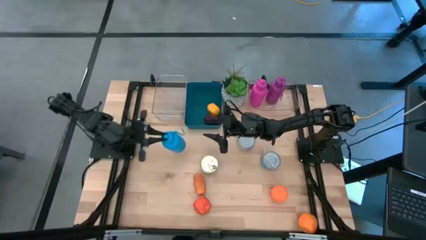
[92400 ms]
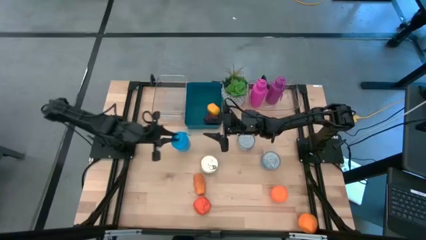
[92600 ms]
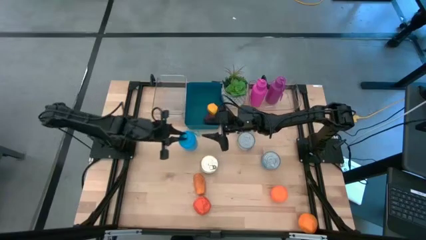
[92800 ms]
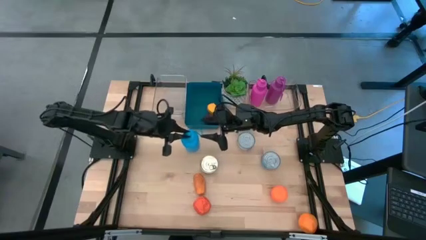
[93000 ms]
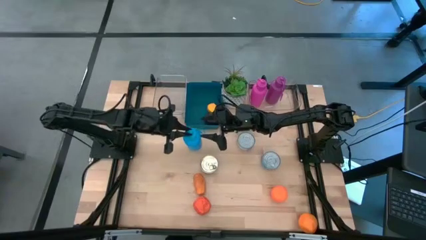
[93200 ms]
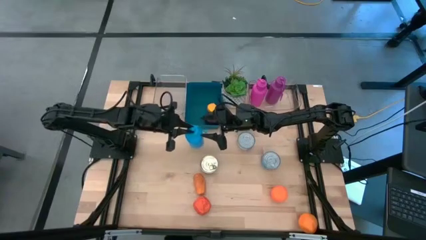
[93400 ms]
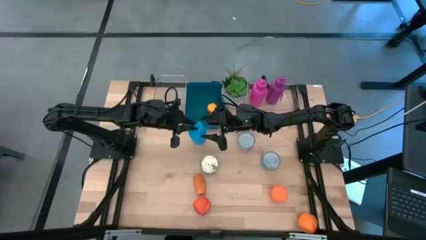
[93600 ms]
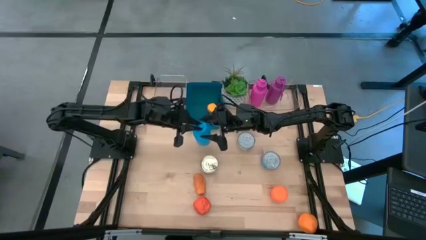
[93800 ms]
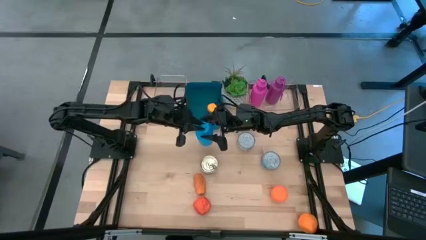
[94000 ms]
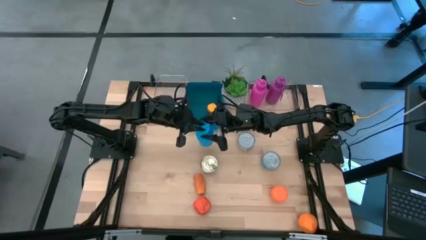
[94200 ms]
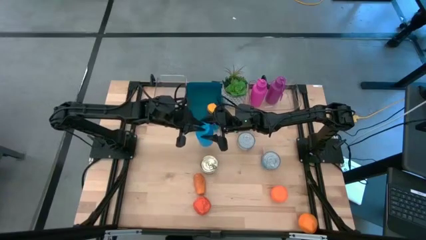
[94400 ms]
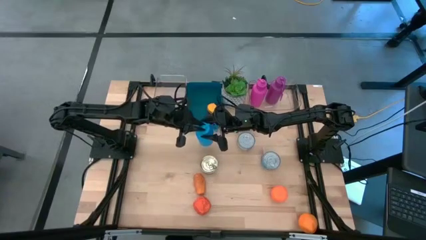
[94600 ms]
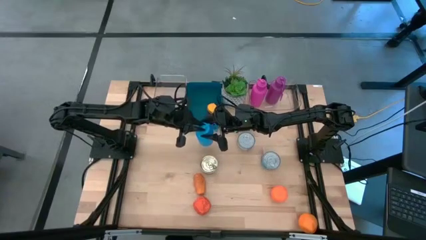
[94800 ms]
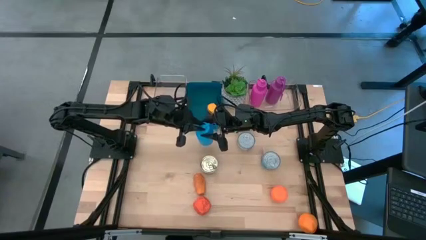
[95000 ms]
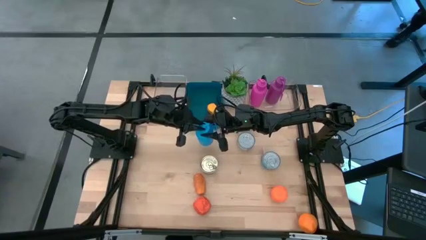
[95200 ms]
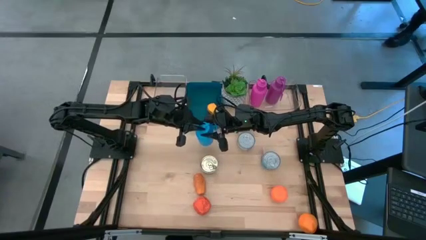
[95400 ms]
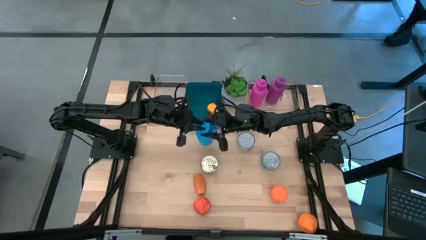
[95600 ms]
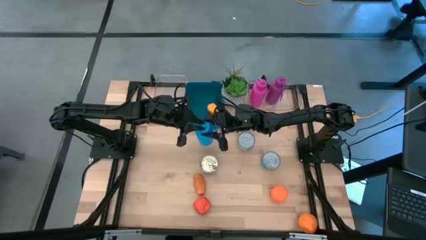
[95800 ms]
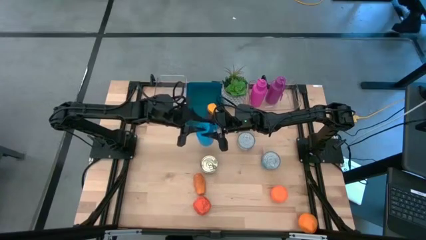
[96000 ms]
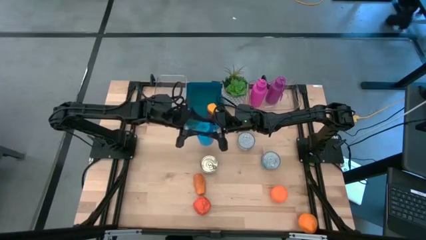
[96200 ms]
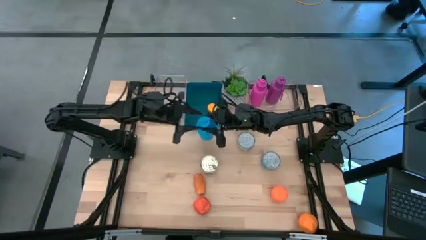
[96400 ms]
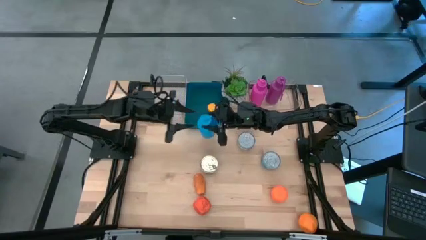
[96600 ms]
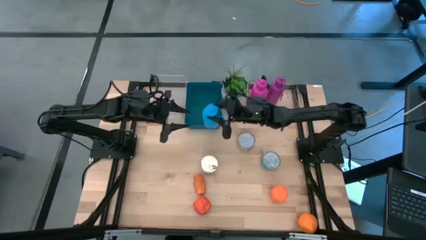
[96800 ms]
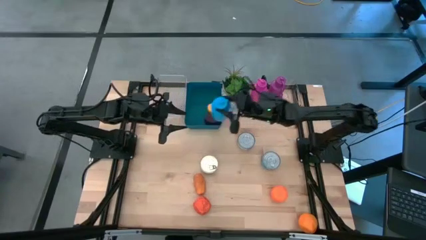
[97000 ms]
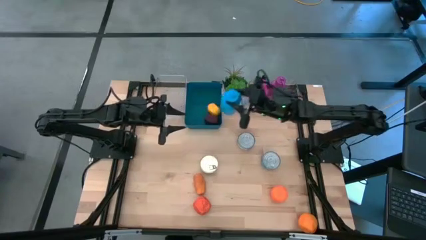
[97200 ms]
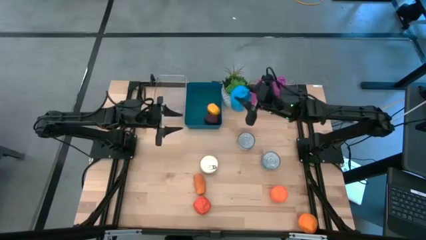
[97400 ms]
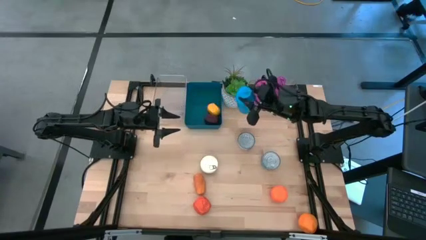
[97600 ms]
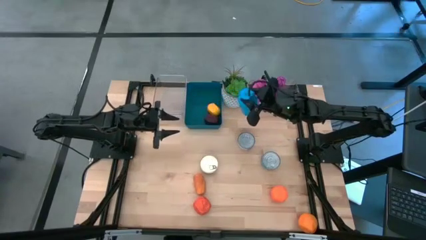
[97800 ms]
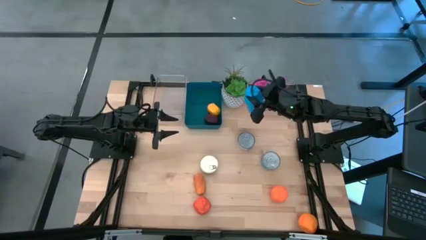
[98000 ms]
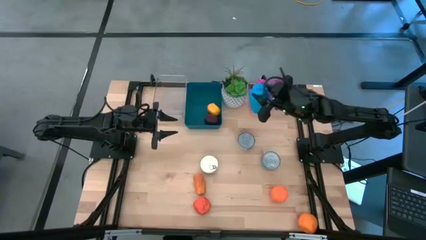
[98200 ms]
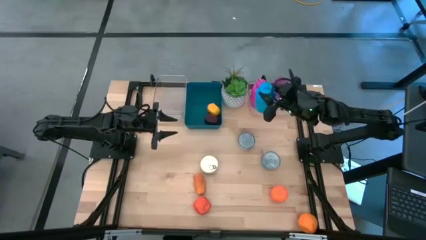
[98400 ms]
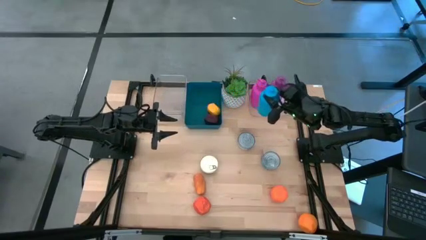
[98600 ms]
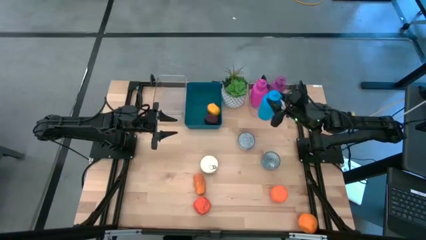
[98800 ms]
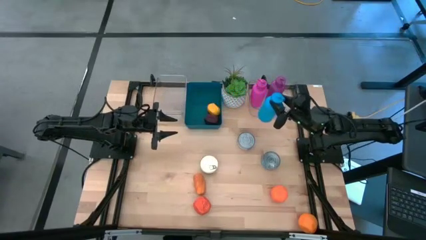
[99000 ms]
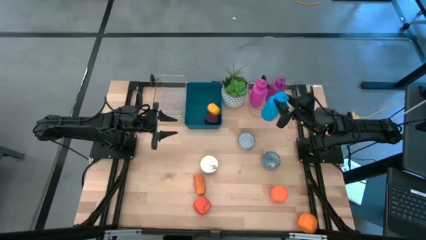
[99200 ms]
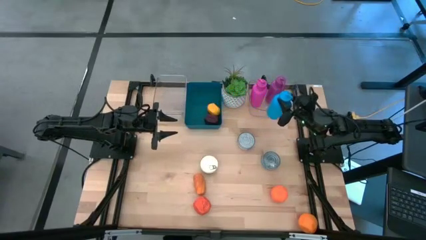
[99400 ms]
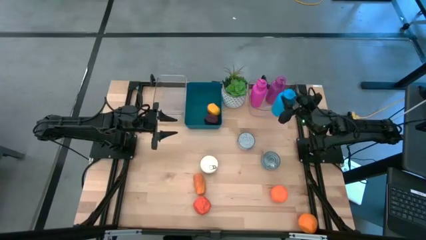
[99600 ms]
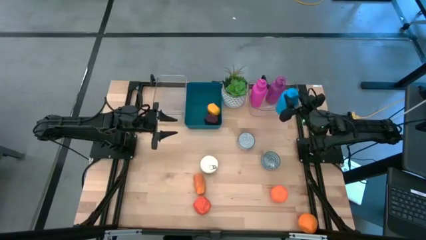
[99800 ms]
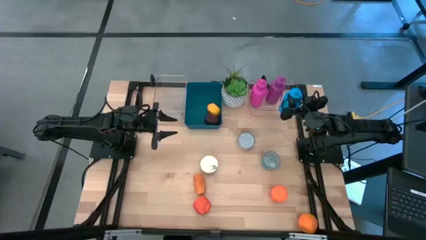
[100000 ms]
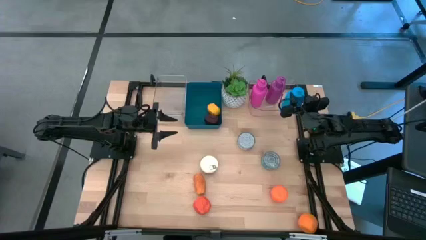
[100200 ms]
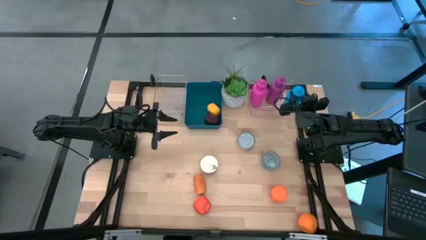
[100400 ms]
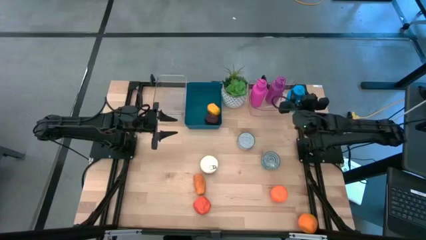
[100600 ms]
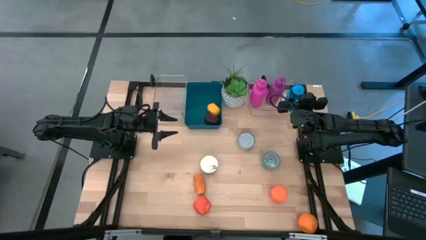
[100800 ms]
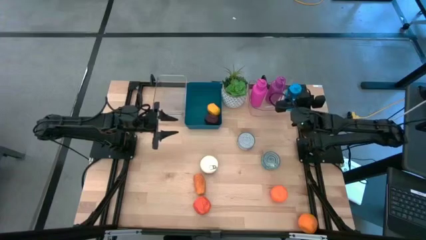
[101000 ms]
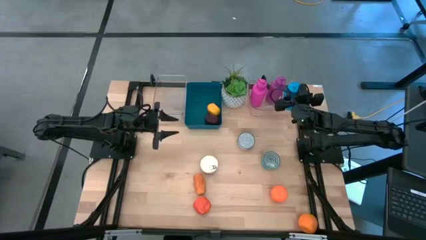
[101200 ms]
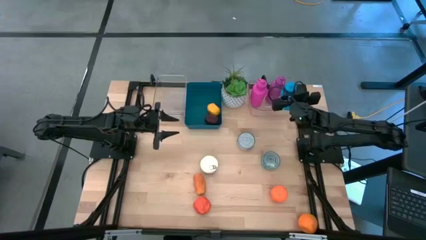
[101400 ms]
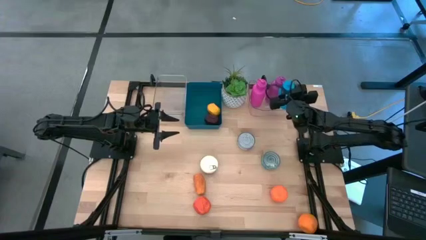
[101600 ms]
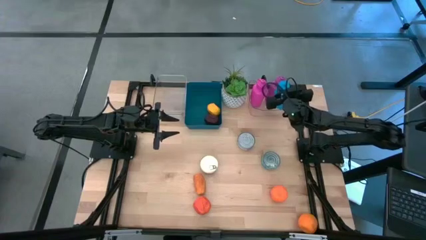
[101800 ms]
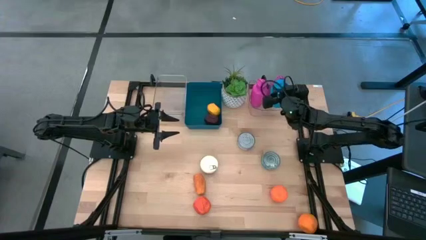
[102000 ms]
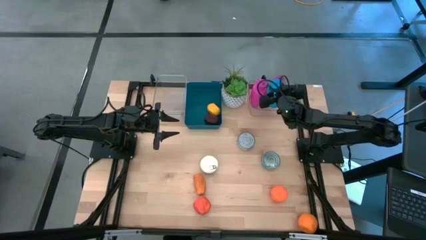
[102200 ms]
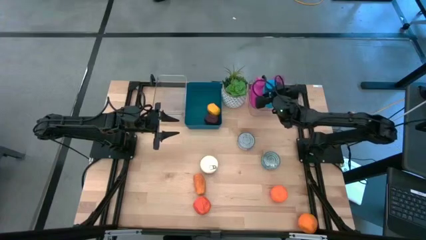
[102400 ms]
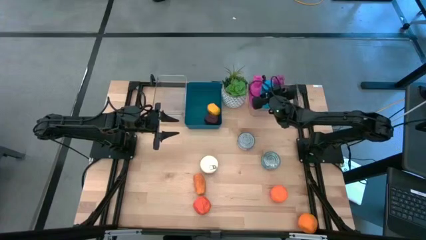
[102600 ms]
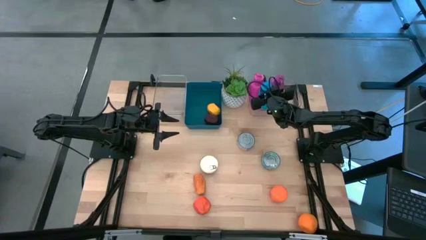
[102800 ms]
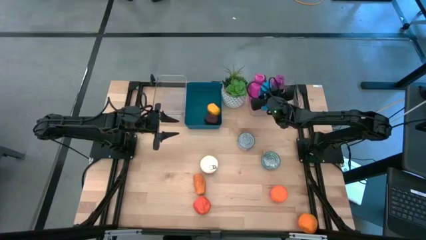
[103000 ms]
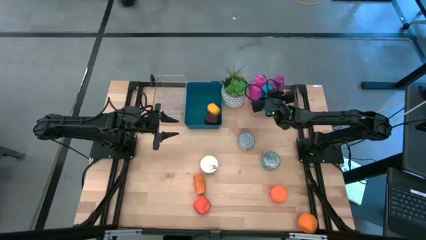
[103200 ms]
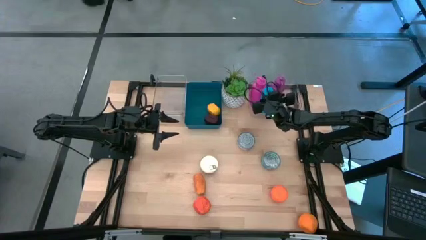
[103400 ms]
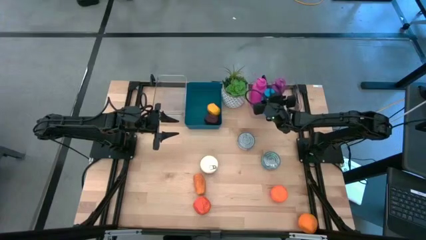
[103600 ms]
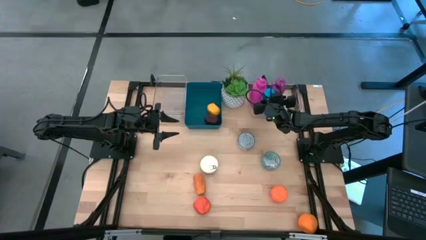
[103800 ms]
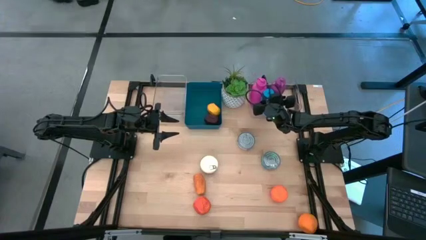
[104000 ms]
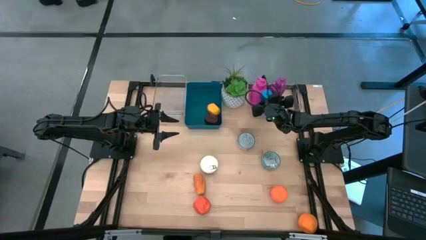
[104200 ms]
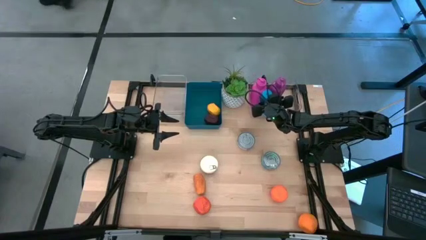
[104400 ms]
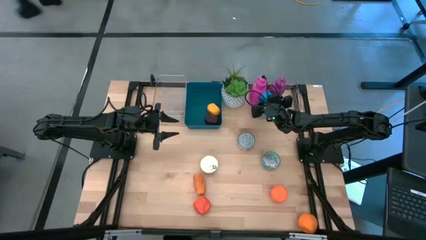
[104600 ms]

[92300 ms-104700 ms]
Task: Pick & Place Food Item
Put the blue bottle into the right transparent bin

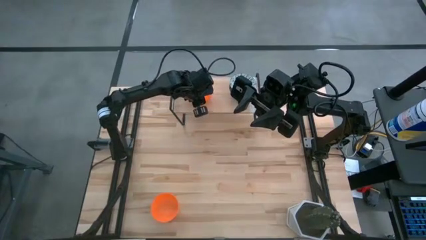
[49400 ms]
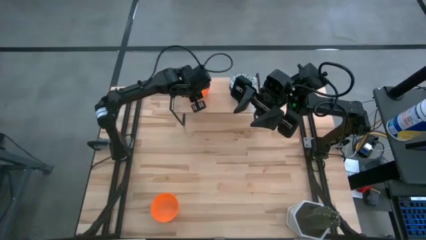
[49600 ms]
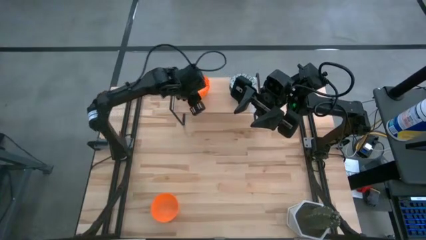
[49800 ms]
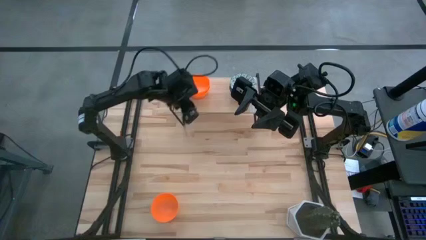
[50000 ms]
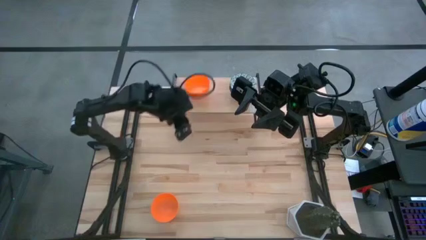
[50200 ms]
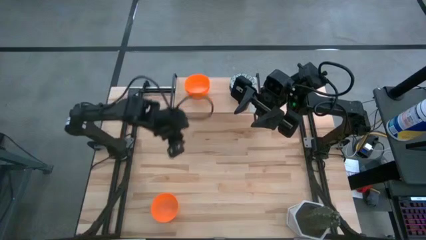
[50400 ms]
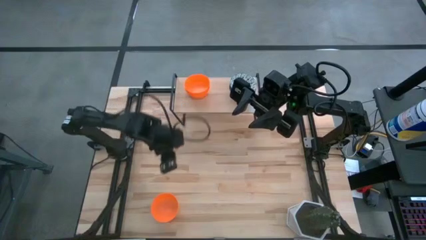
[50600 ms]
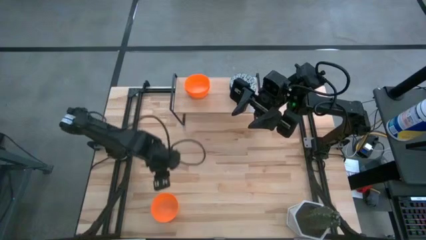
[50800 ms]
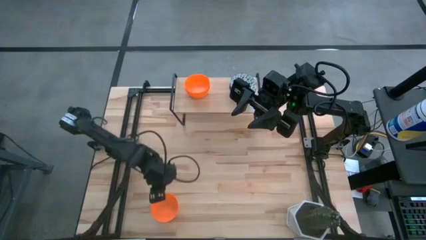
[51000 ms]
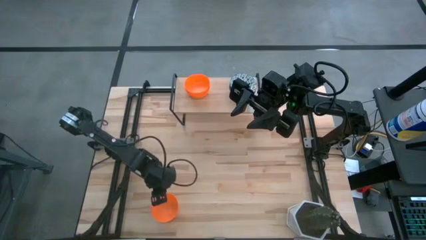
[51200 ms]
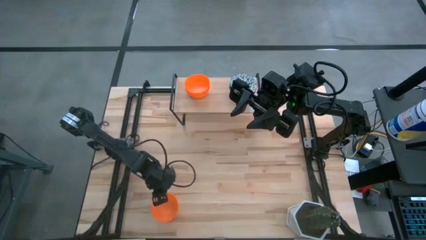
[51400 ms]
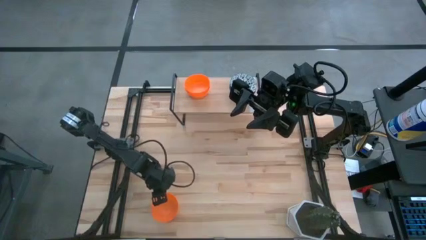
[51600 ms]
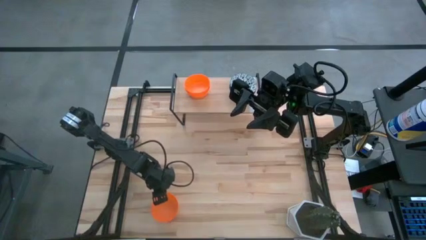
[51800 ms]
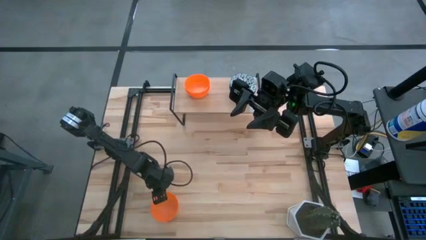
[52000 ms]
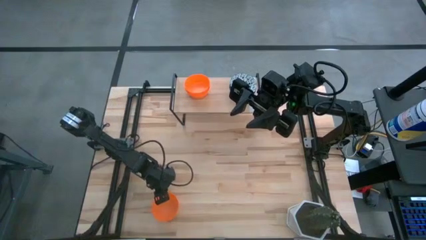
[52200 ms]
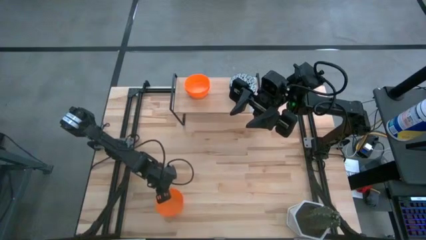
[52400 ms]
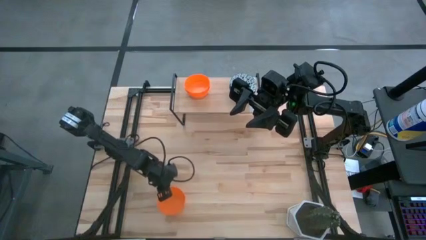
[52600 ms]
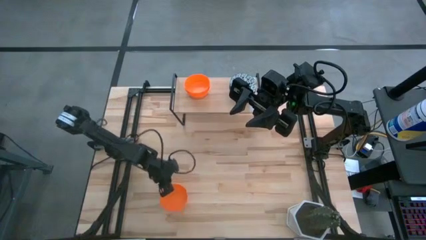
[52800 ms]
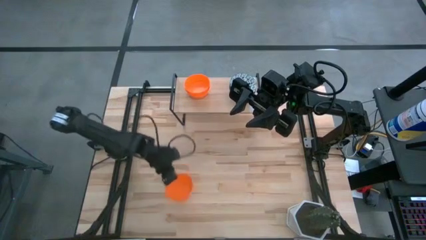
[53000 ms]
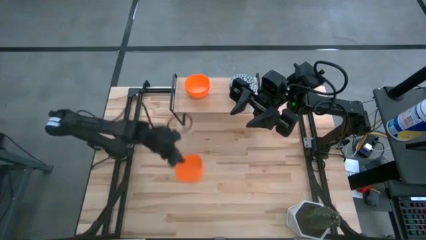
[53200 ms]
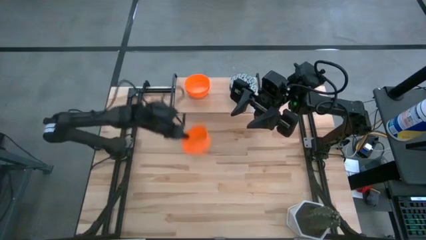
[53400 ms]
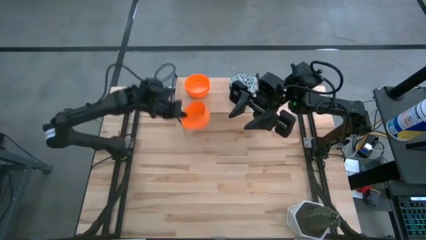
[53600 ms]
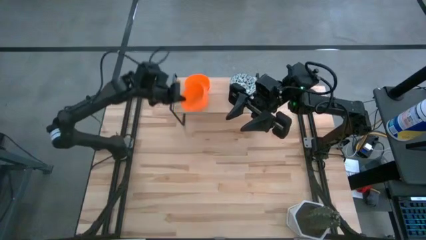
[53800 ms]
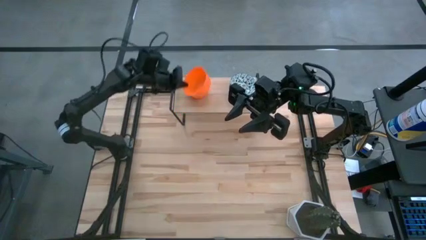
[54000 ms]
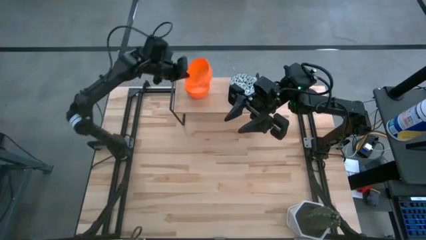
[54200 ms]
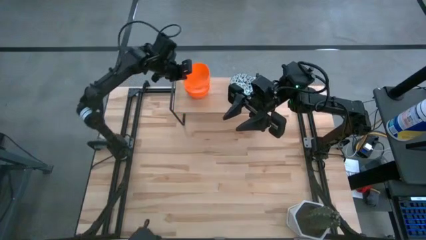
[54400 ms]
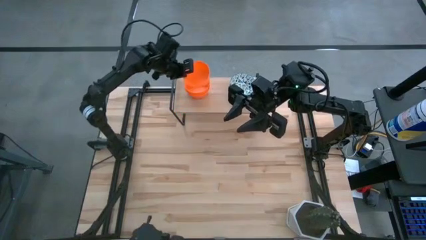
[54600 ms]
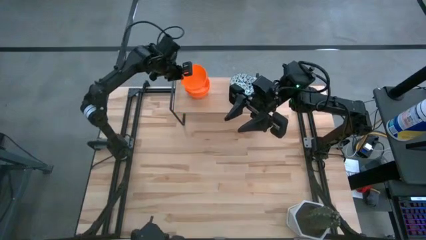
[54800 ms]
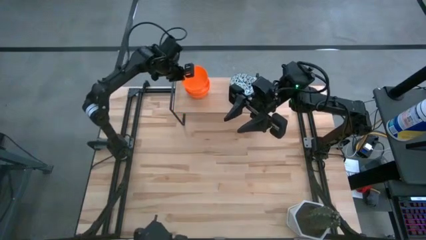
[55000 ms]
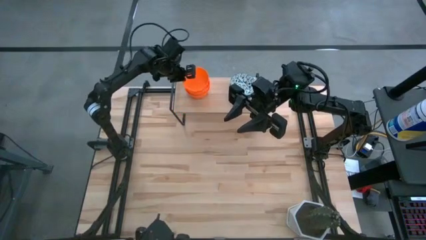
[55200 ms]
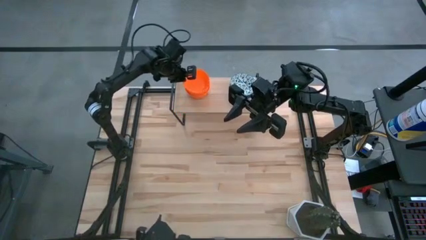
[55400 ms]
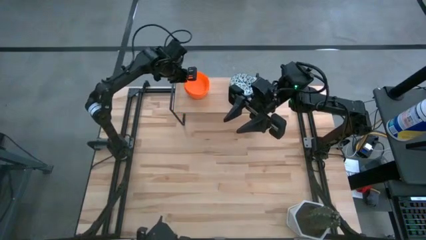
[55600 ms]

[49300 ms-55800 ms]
Task: Pick & Place Mini bowls
Stack the orange bowl on top of the orange bowls on the shelf
